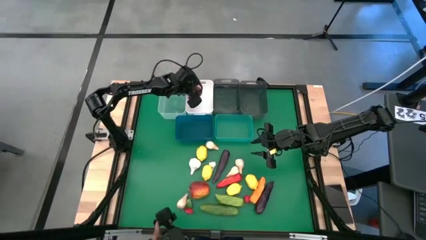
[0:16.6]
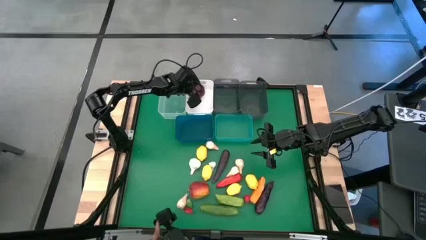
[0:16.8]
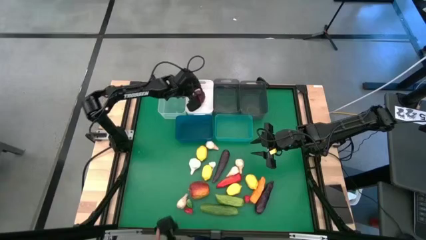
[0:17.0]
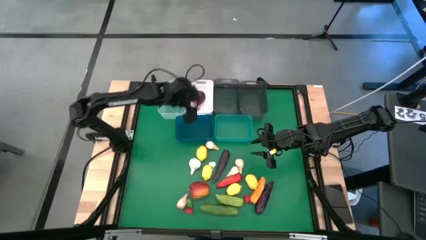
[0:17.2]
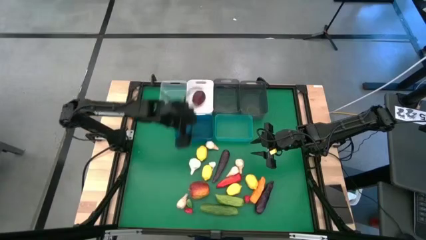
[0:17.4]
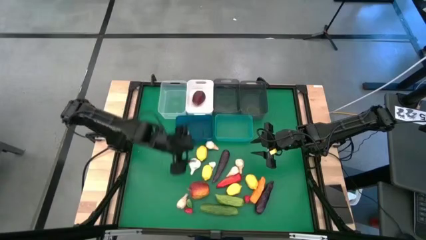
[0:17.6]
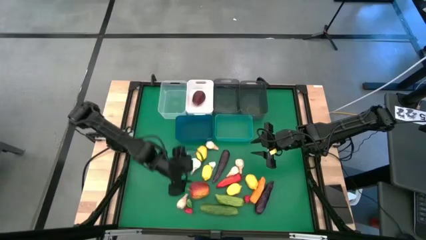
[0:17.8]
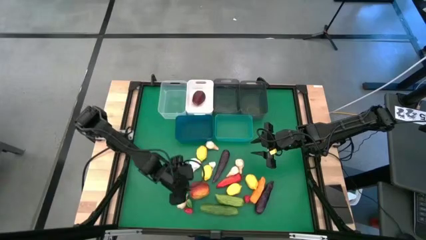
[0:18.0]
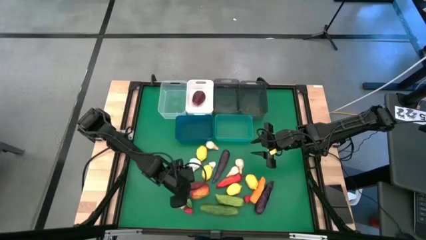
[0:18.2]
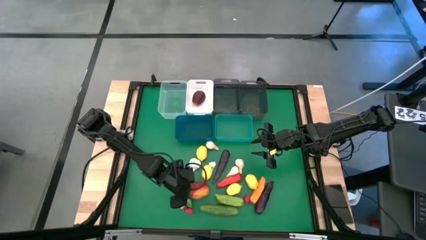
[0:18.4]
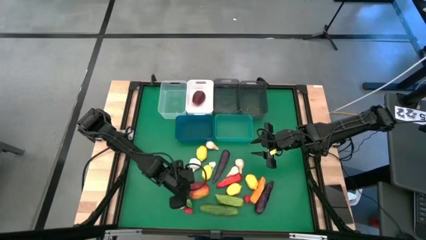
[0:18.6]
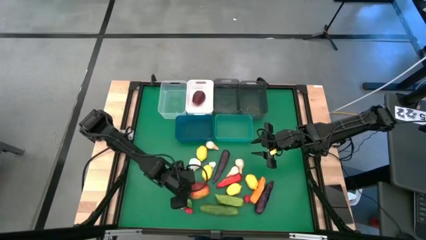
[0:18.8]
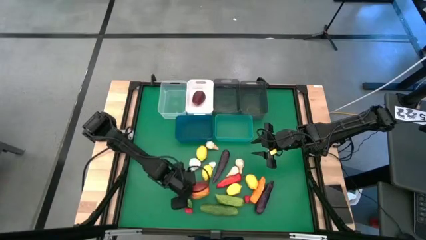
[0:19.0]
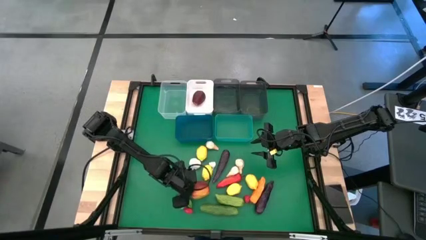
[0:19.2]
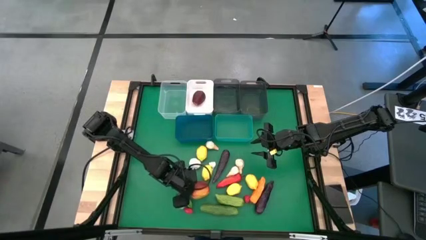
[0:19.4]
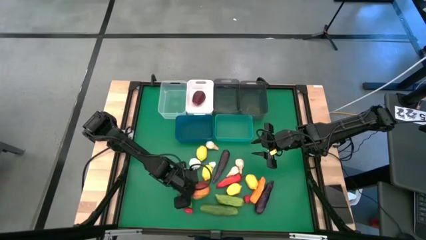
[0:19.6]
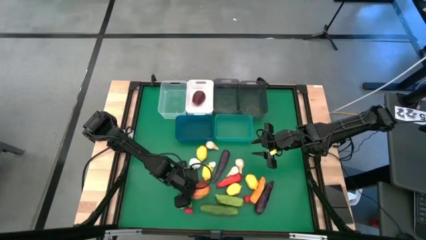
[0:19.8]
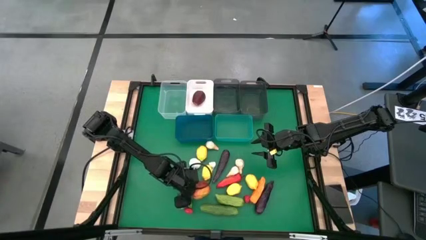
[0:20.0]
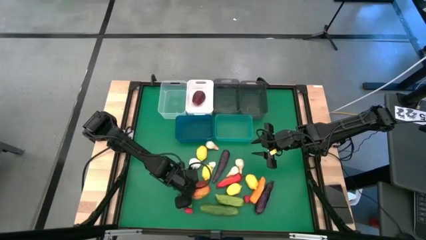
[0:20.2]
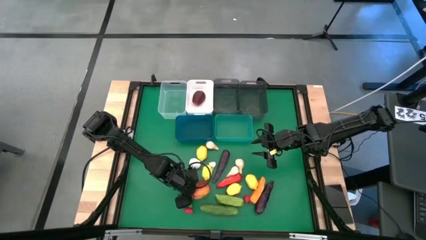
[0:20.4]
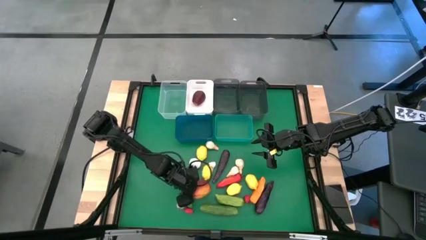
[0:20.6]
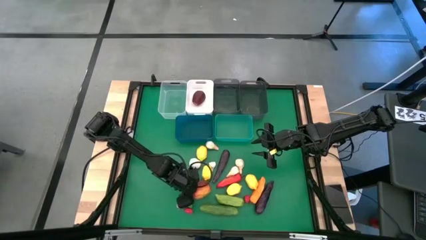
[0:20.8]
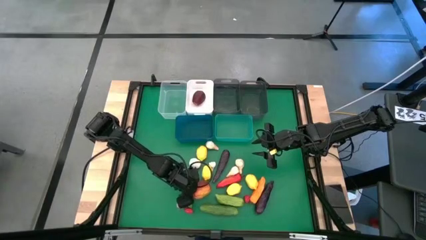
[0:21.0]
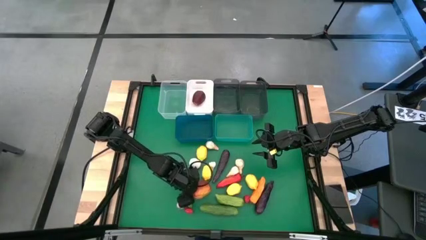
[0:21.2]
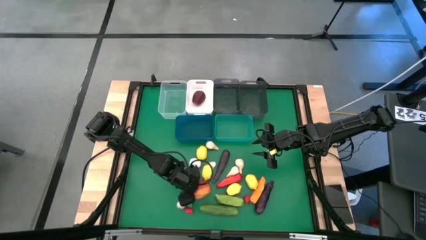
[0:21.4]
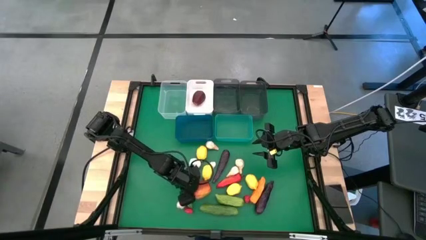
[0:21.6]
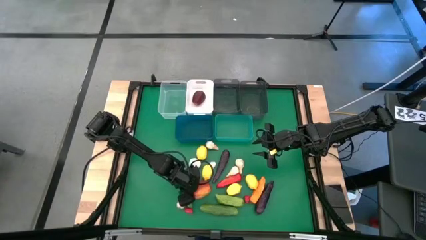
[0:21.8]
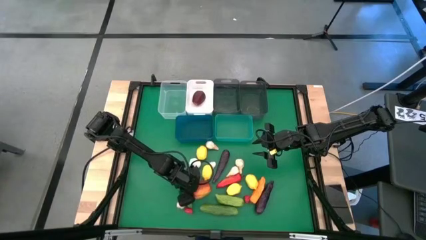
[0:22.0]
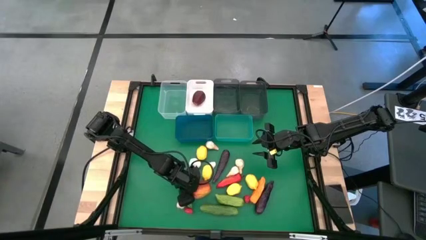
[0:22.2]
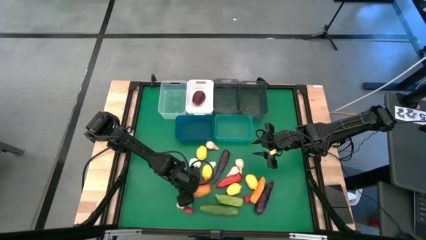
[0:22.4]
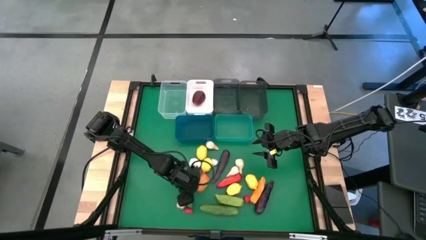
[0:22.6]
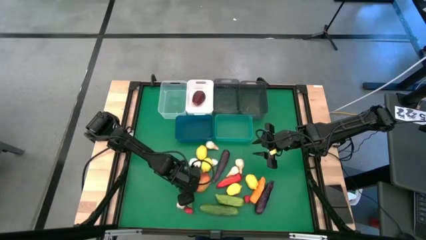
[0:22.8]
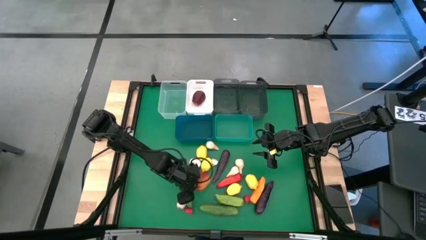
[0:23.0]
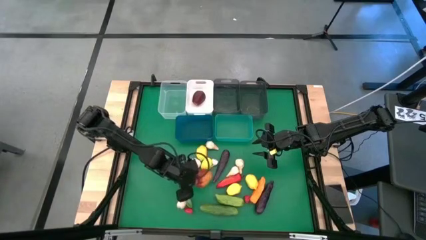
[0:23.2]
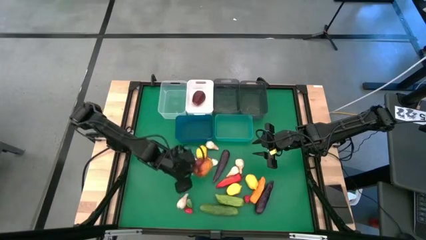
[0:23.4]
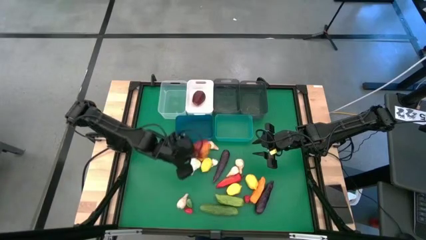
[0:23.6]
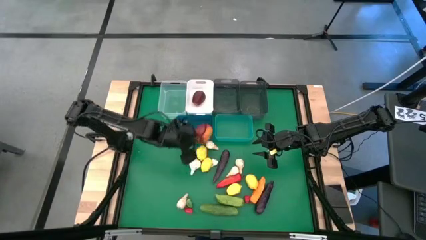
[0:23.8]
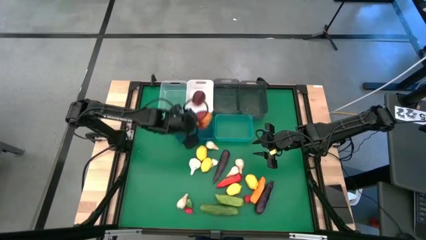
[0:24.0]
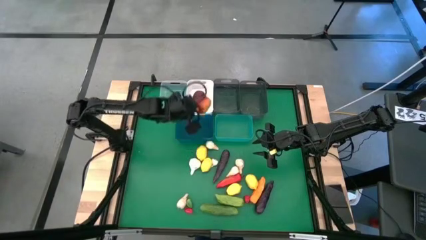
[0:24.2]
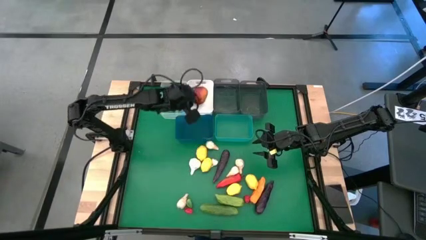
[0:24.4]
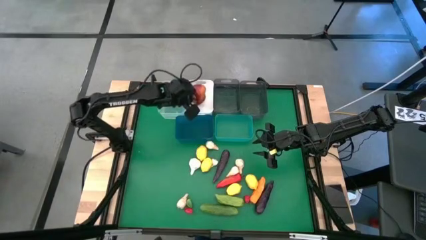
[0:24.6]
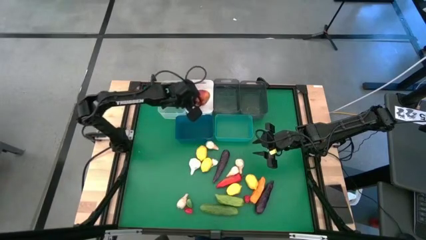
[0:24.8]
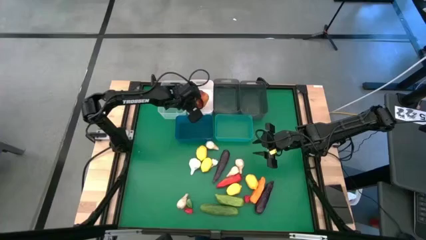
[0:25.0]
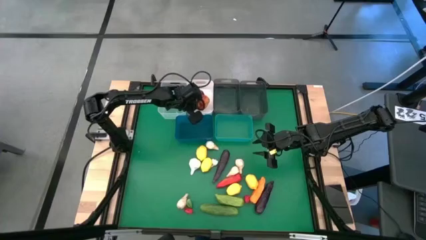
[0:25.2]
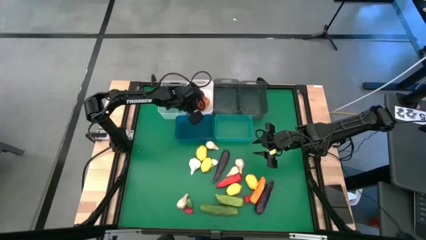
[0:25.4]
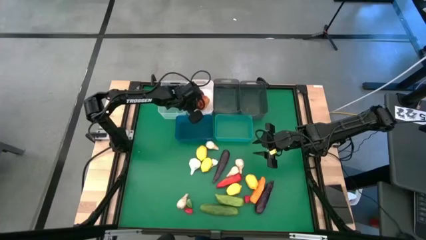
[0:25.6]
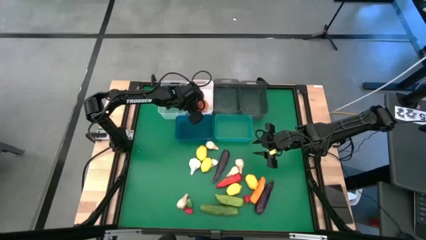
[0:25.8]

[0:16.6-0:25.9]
Task: Sort produce into baskets
Put the apple into the white bin

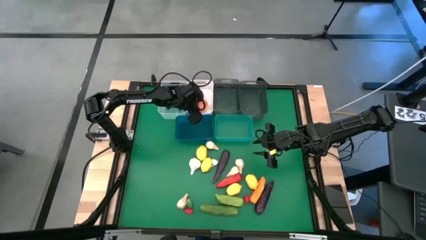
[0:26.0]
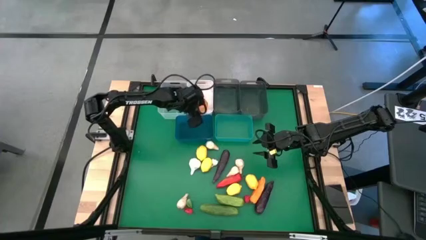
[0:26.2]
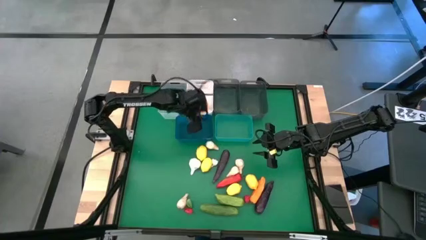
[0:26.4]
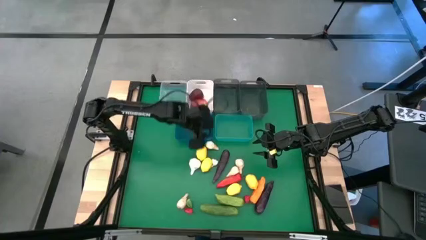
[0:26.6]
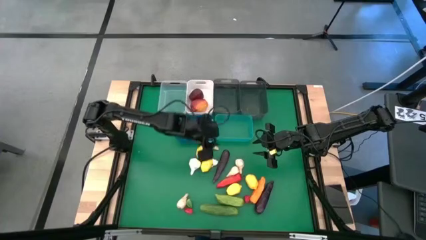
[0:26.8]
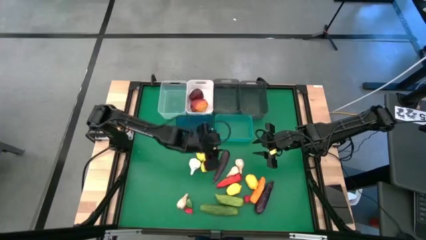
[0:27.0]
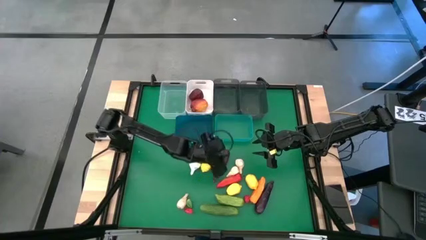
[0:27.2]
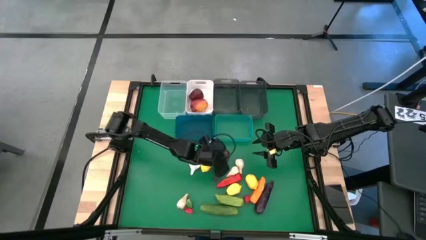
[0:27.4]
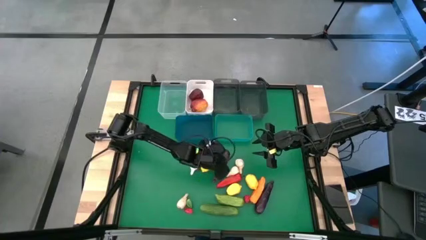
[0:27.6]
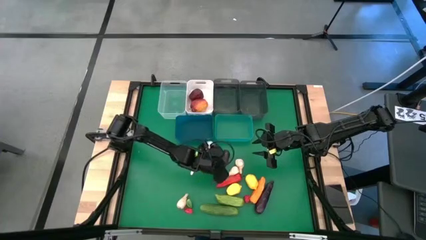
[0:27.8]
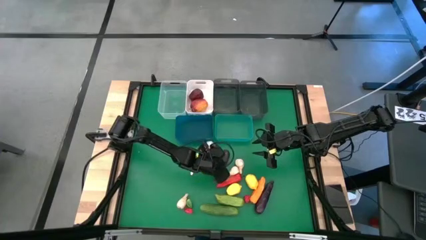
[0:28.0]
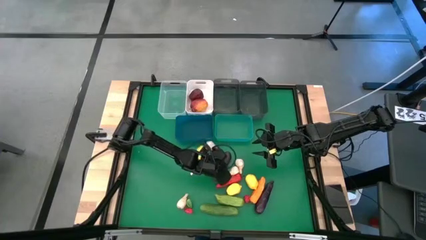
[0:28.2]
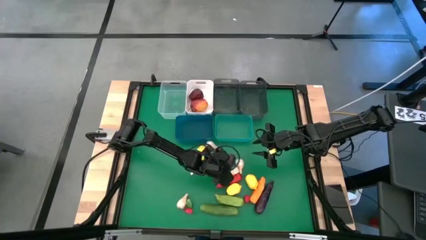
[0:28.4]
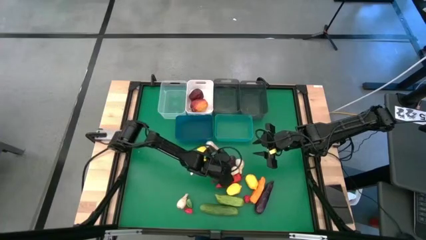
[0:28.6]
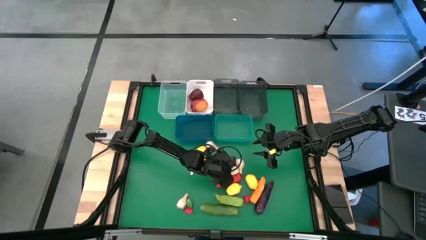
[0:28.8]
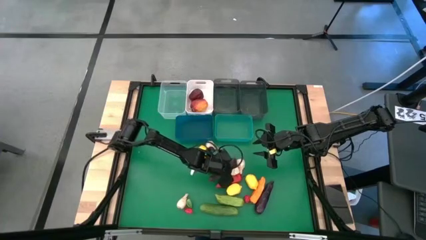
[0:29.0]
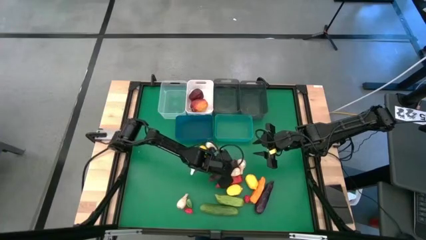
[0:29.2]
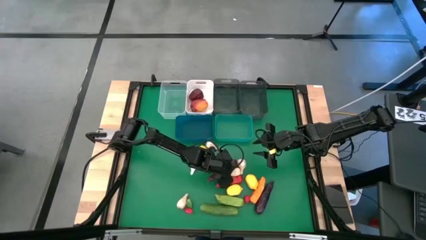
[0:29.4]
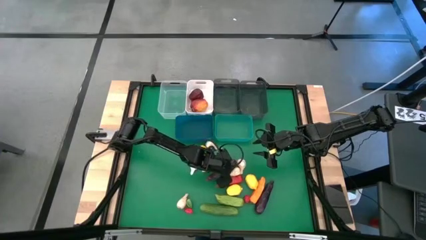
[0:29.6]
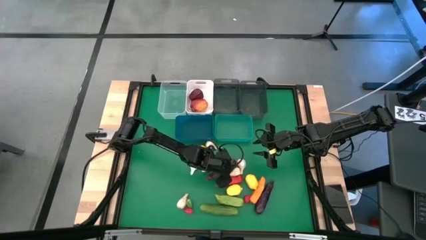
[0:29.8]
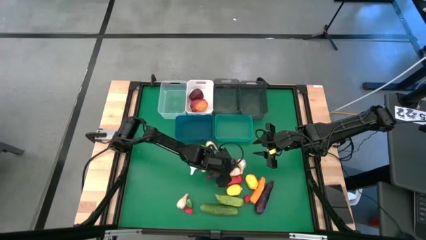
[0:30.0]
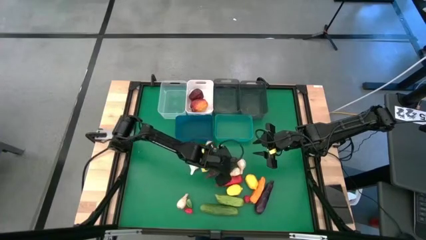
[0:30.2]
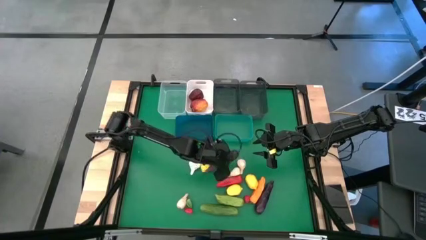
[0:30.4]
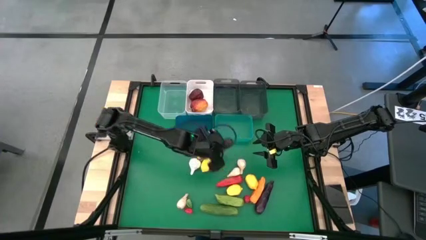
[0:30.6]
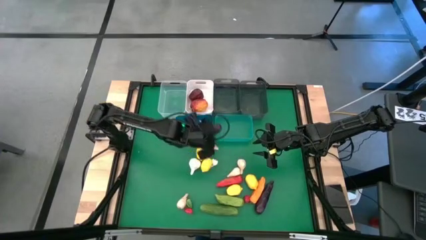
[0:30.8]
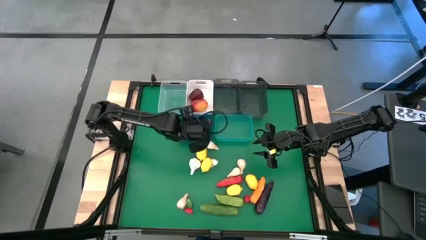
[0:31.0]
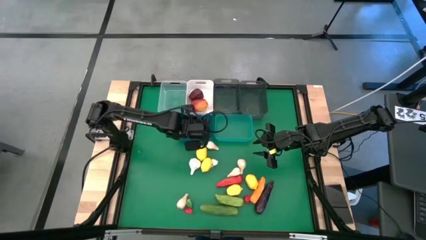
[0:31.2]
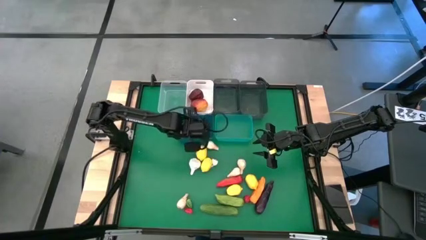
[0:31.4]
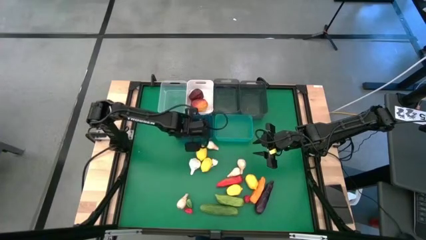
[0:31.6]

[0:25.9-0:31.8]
Put the eggplant into the dark blue bin
